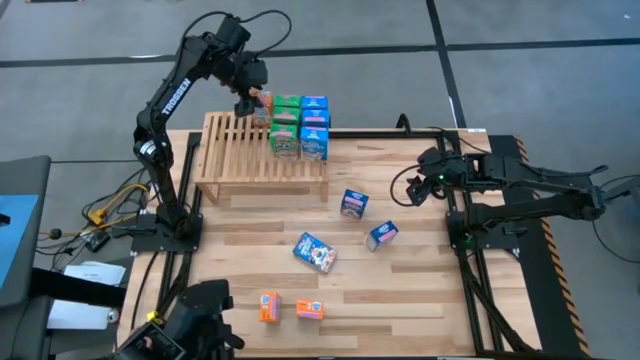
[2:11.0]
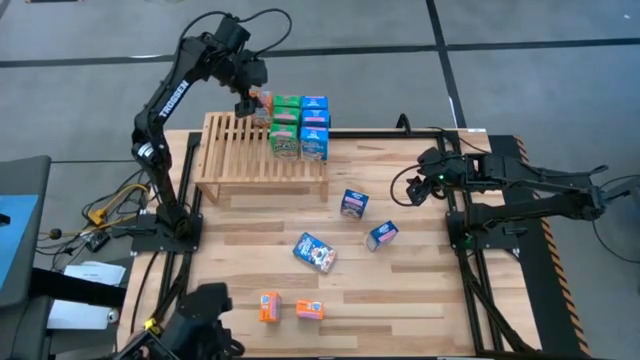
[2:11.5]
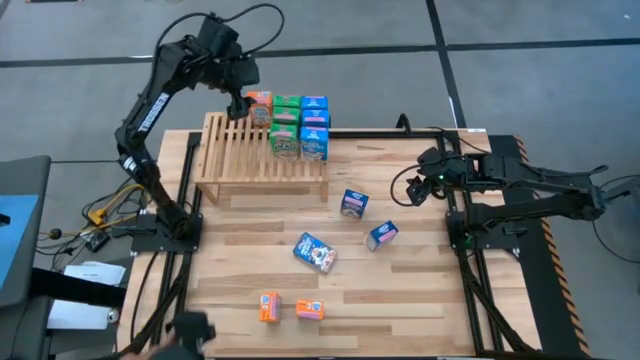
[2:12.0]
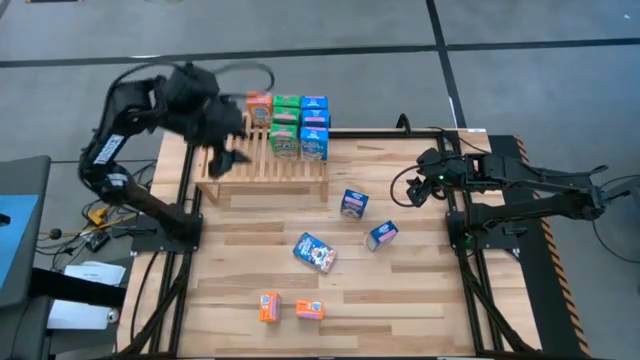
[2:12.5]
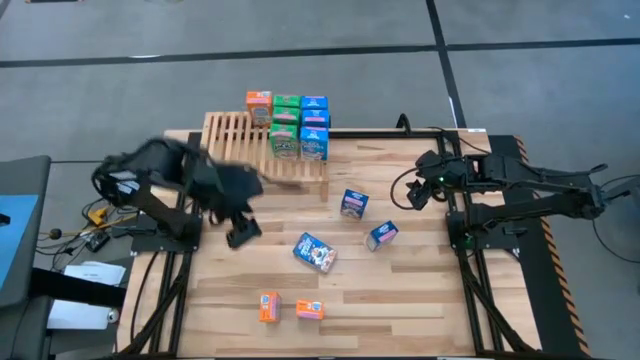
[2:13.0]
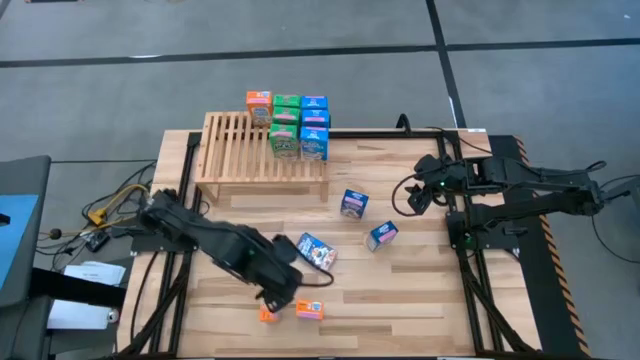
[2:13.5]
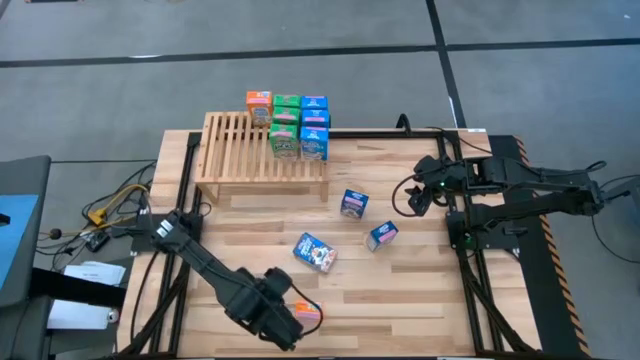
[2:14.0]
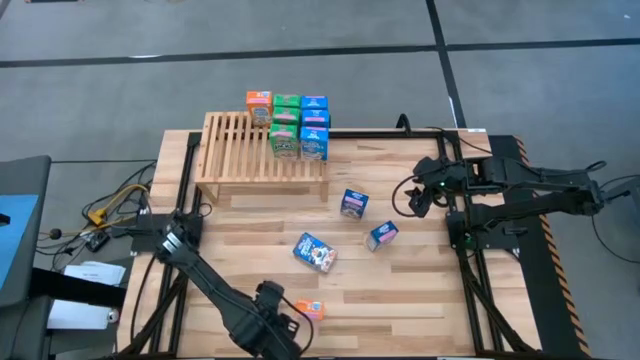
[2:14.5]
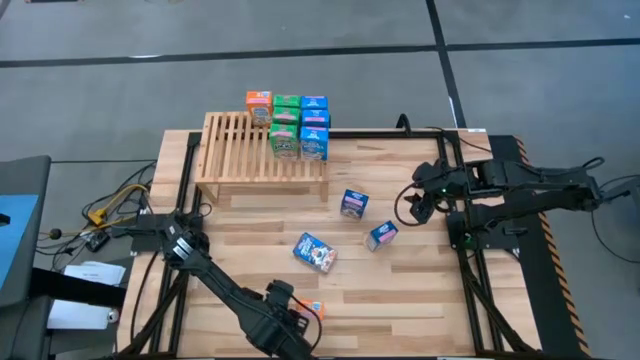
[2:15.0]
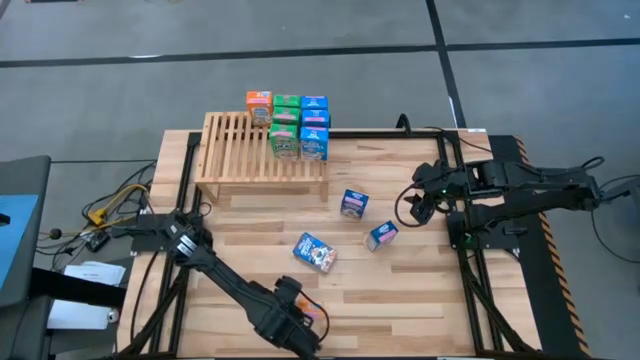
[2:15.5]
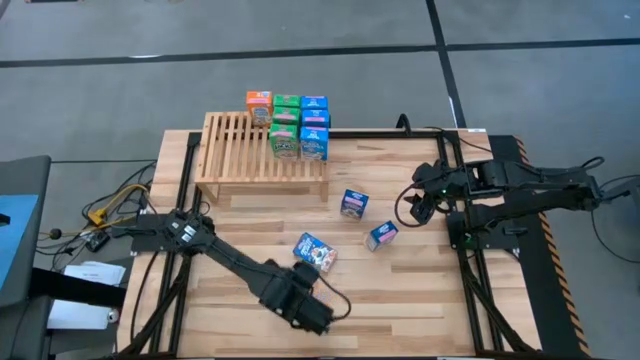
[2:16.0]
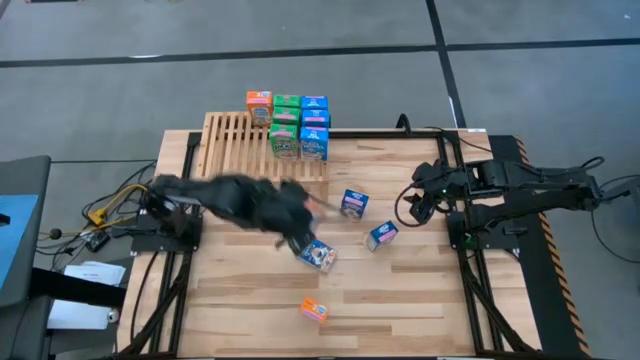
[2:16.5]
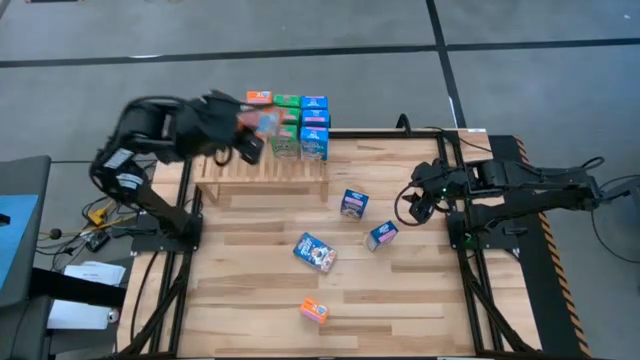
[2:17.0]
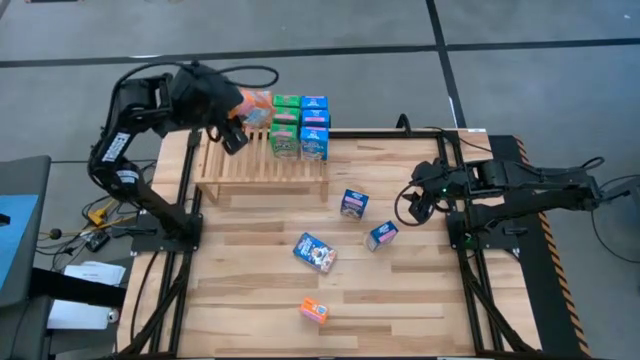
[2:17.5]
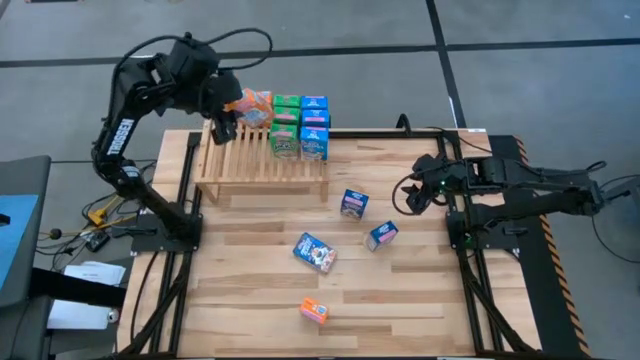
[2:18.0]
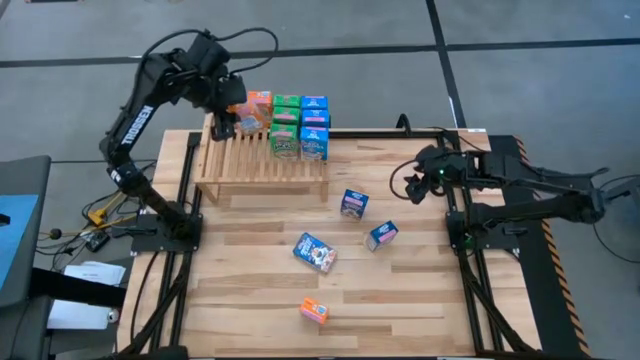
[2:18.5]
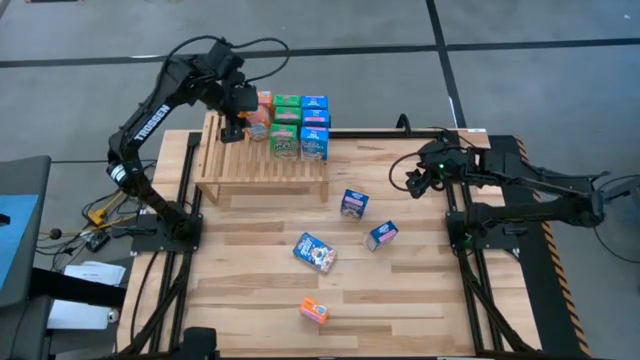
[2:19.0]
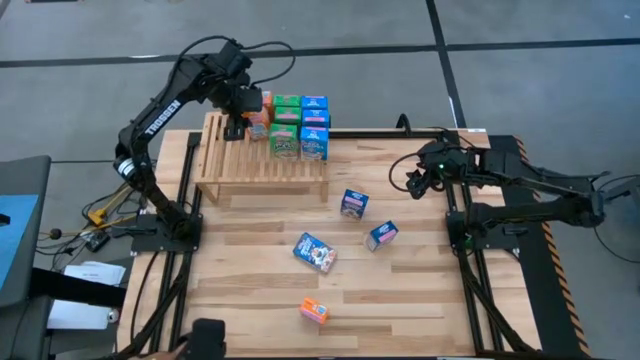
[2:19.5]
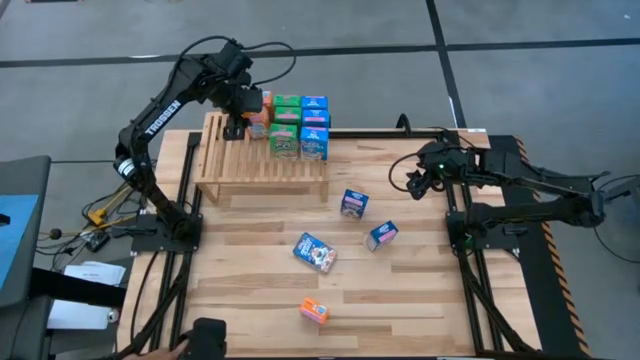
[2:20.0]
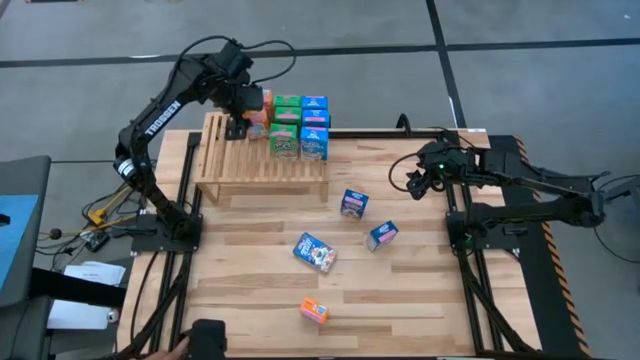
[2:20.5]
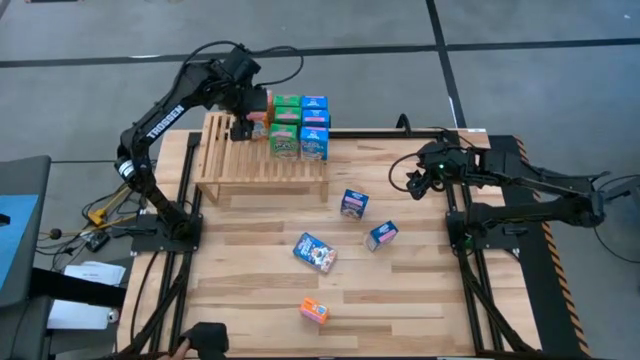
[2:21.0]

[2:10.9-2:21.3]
Task: Stack cereal on shelf
Put the left orange cereal box on the shelf aligned with the other orange cereal box

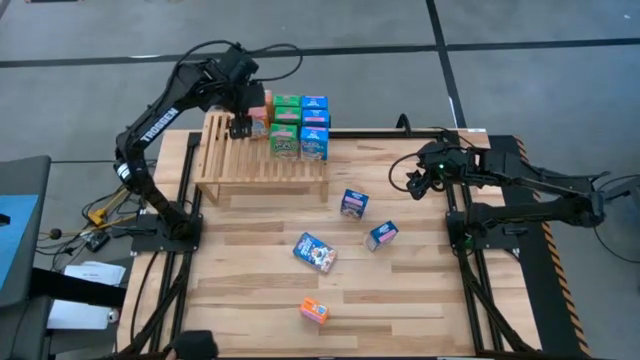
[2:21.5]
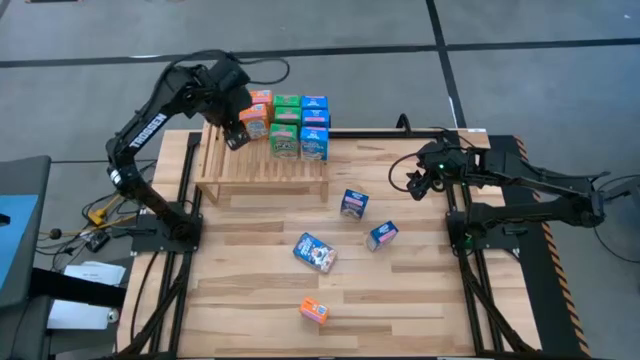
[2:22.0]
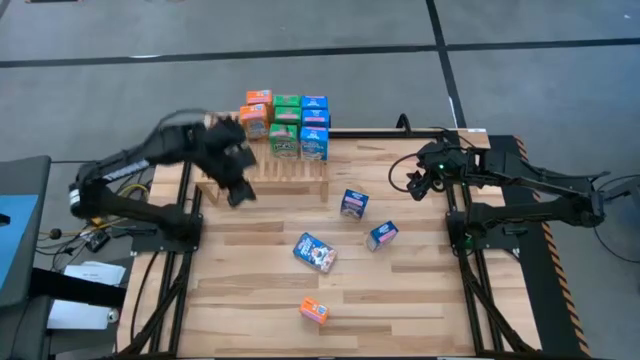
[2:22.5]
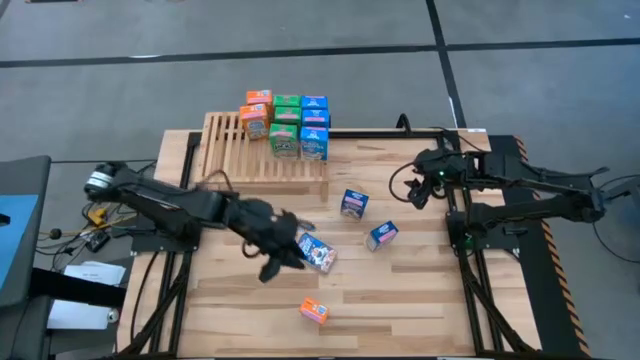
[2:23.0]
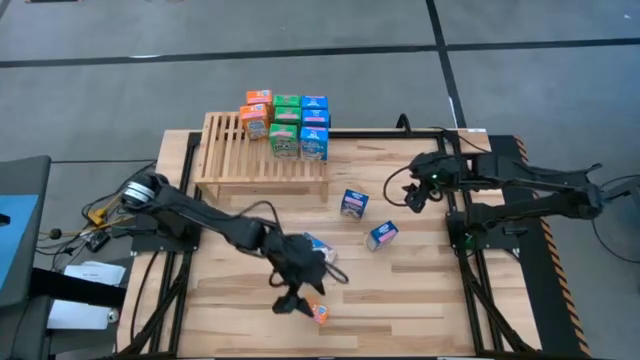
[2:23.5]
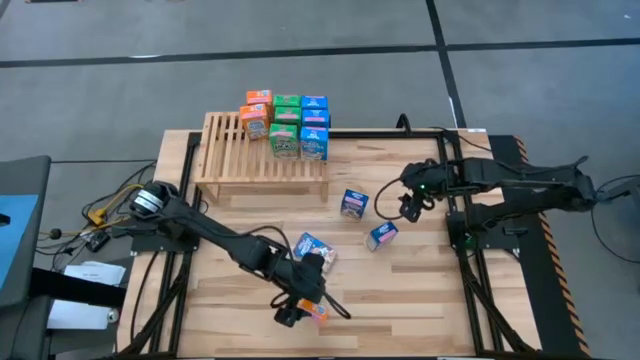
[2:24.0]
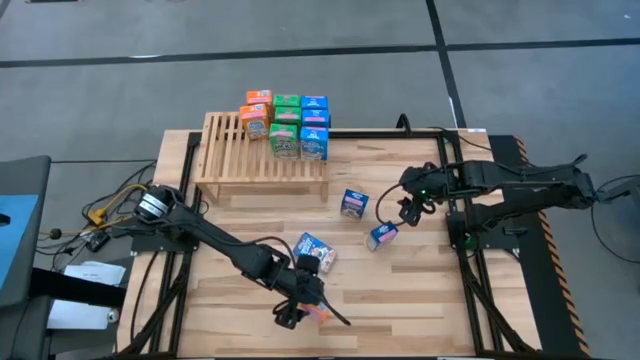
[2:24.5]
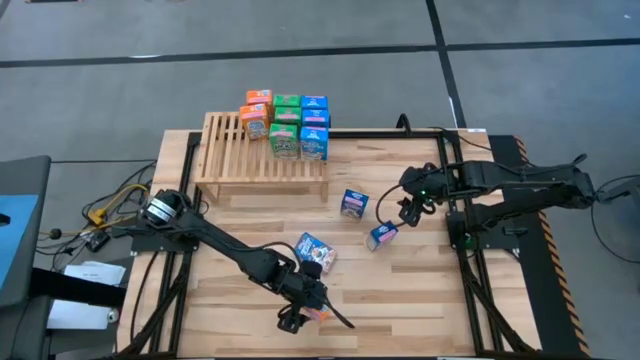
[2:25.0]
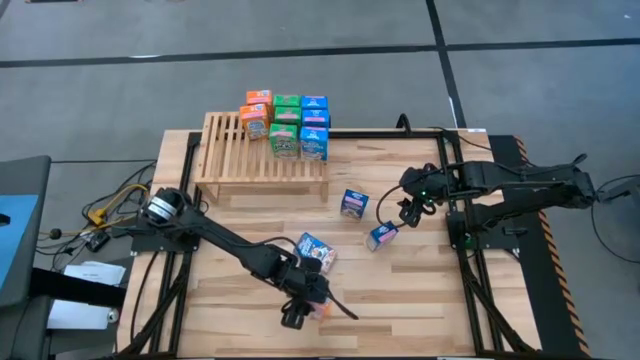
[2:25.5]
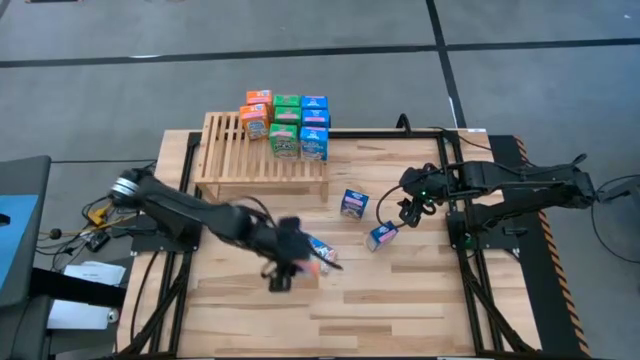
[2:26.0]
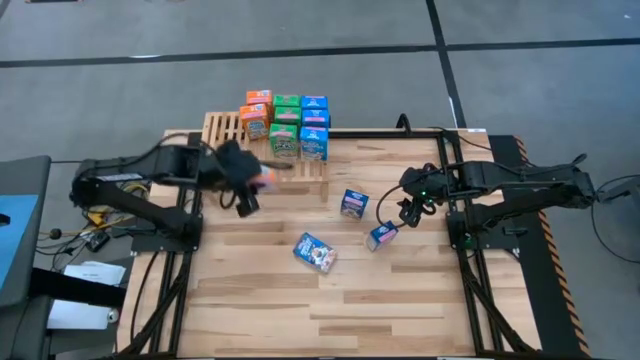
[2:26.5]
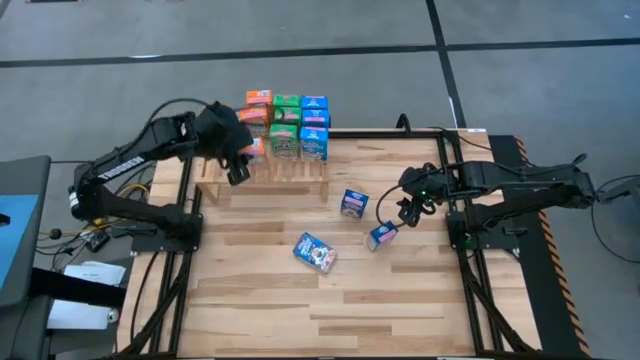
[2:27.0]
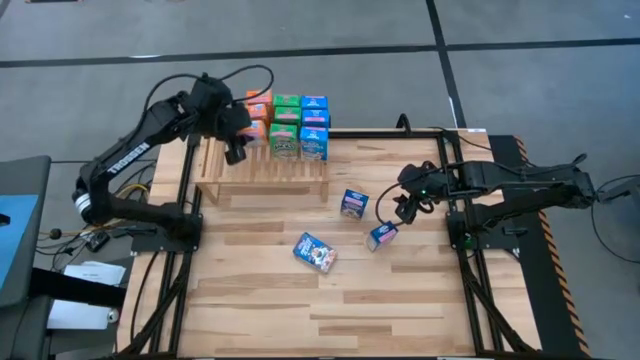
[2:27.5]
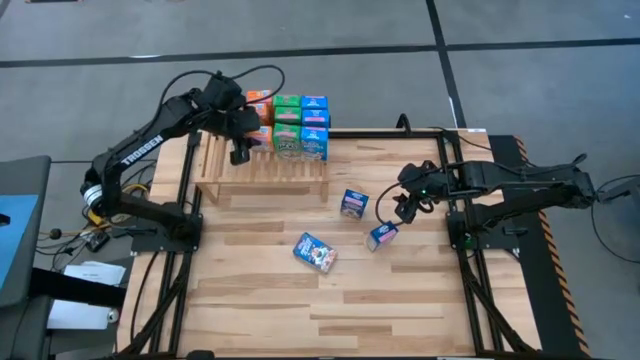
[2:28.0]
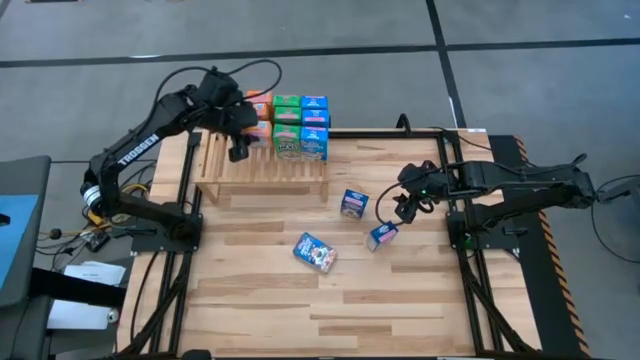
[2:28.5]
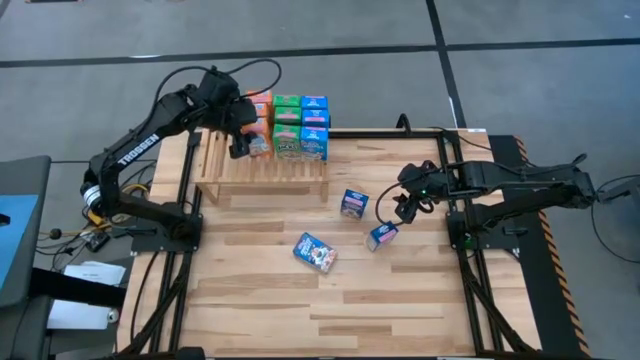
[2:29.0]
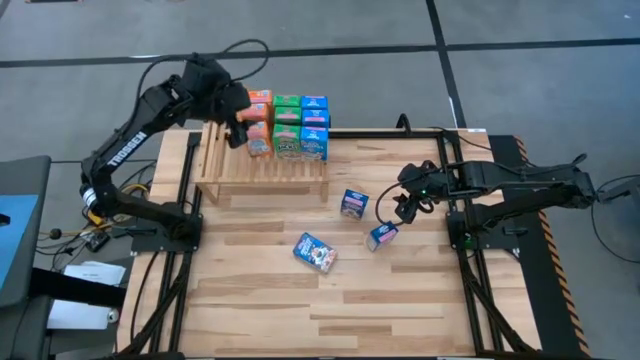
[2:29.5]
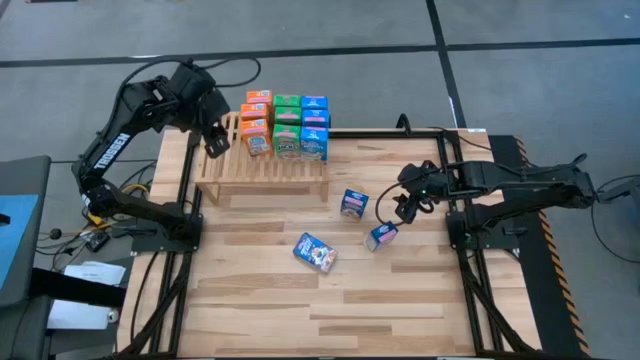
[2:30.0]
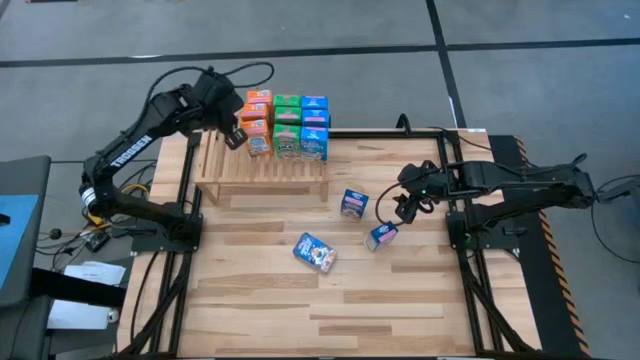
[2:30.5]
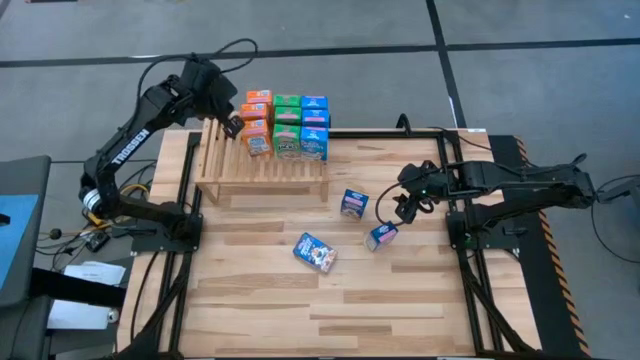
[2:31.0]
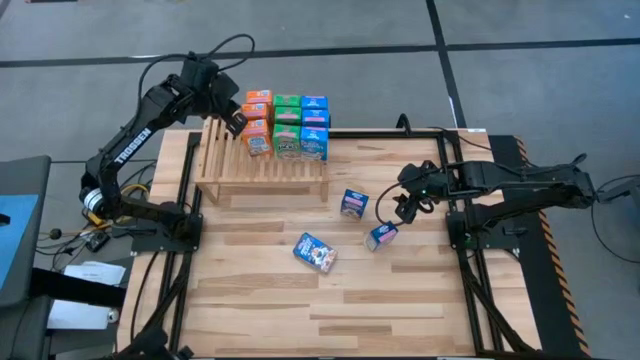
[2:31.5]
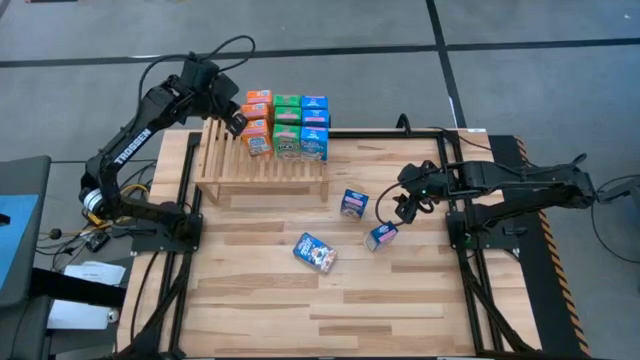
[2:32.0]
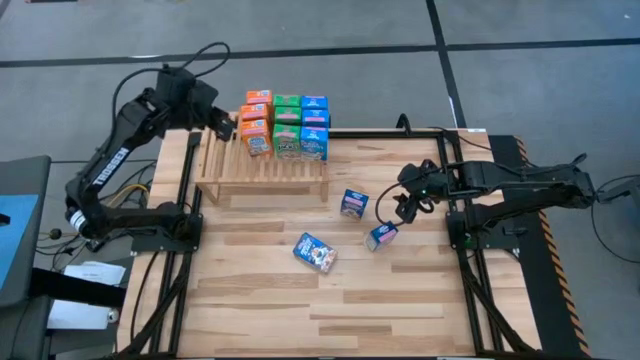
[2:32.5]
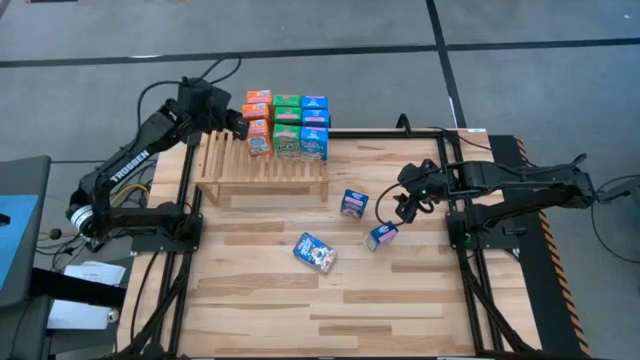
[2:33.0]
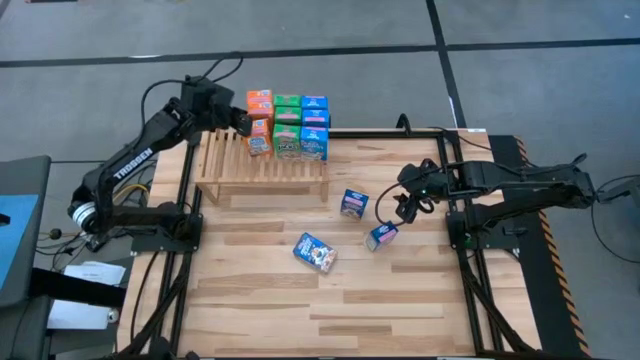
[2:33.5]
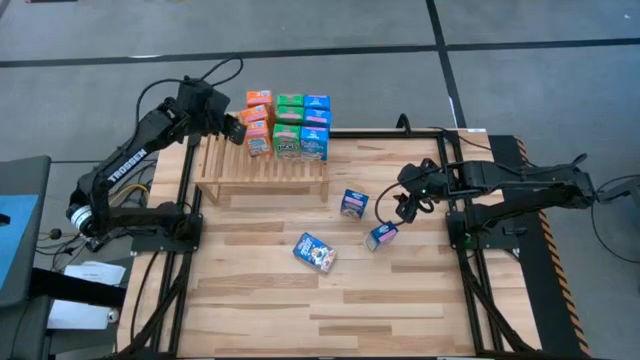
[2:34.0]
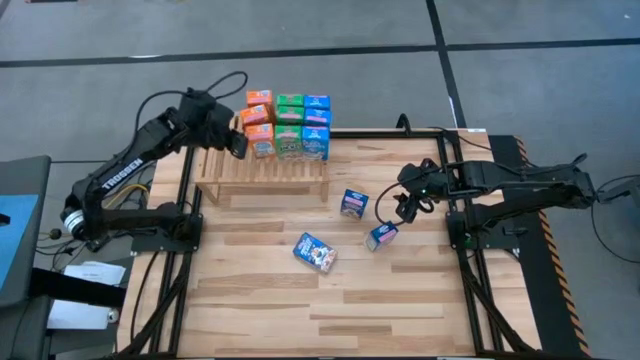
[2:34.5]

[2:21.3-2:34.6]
Put the orange cereal on the shelf aligned with the other orange cereal boxes
